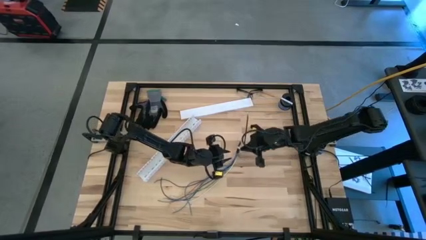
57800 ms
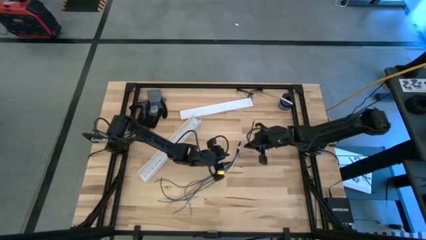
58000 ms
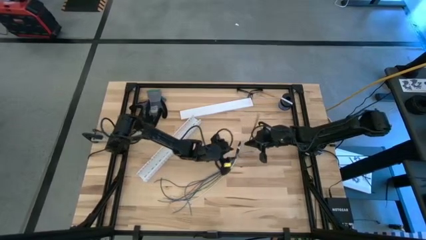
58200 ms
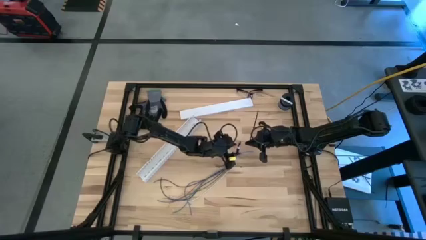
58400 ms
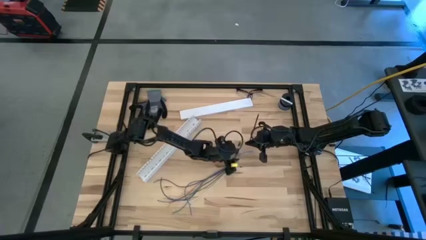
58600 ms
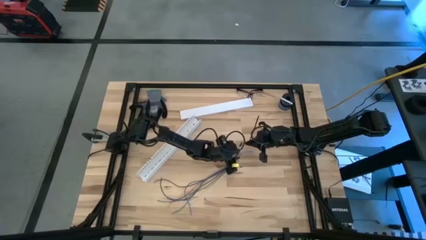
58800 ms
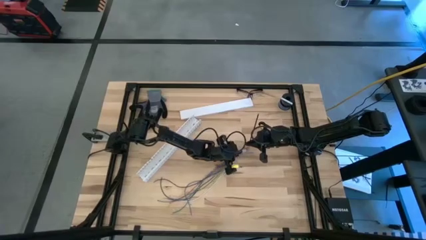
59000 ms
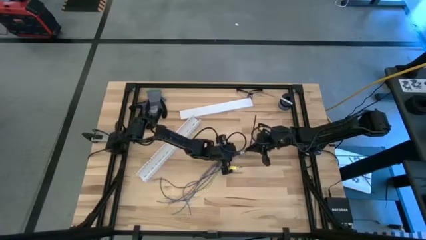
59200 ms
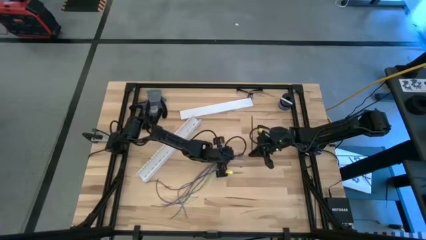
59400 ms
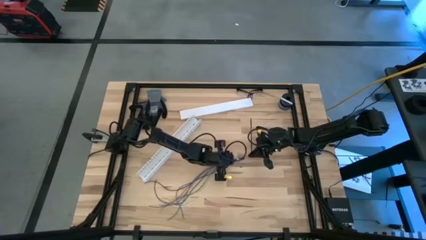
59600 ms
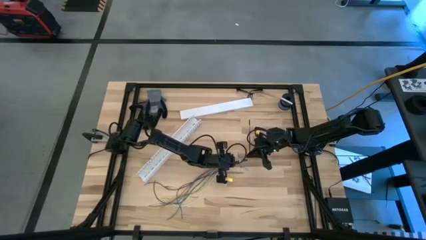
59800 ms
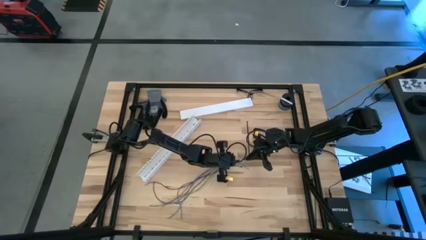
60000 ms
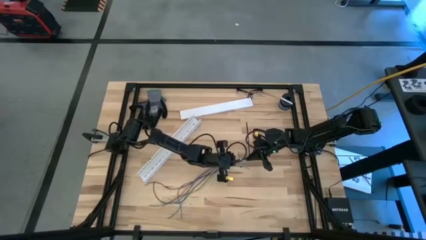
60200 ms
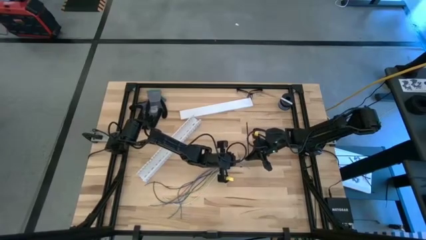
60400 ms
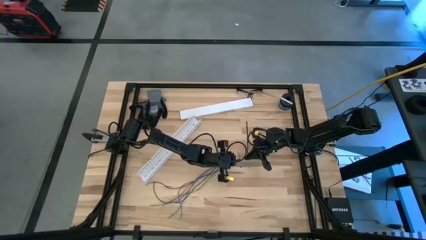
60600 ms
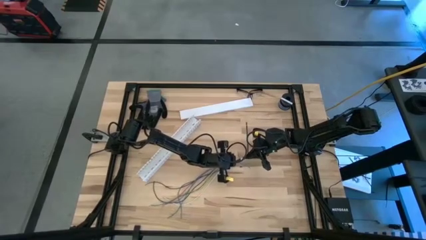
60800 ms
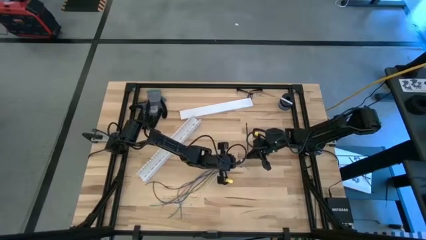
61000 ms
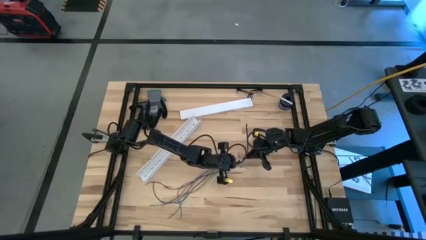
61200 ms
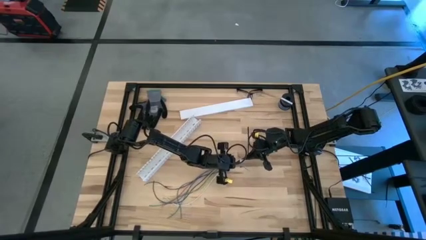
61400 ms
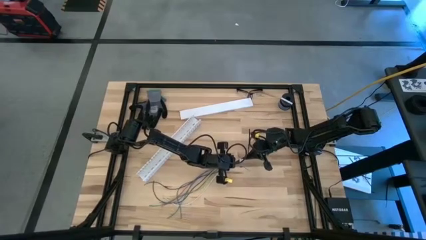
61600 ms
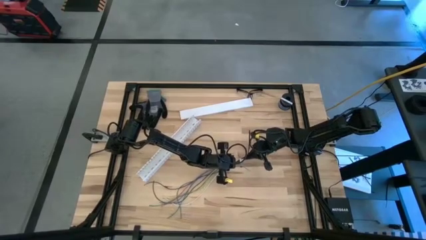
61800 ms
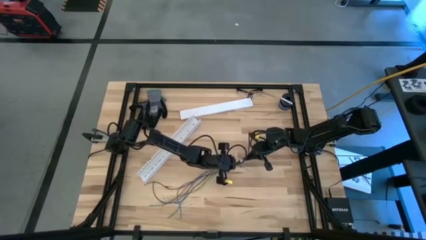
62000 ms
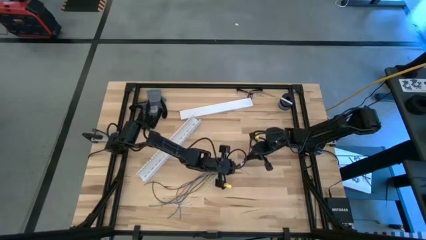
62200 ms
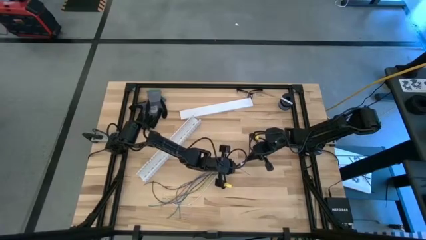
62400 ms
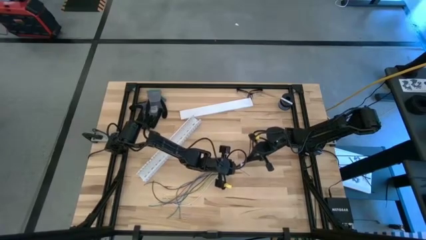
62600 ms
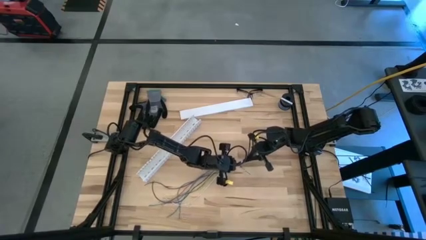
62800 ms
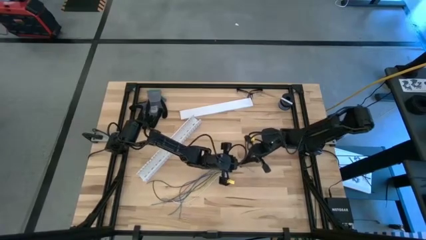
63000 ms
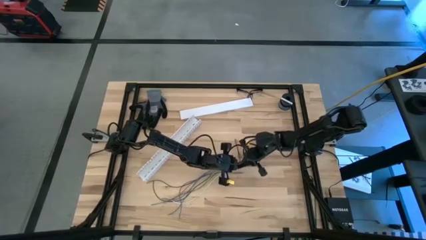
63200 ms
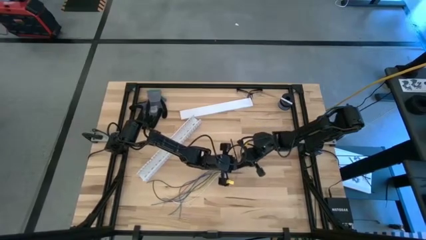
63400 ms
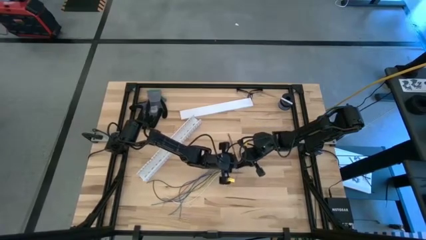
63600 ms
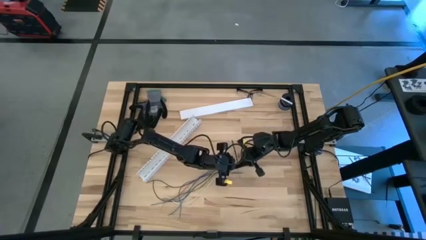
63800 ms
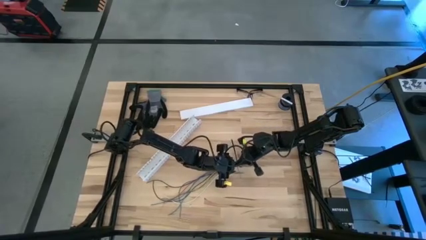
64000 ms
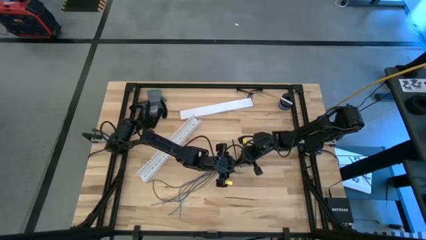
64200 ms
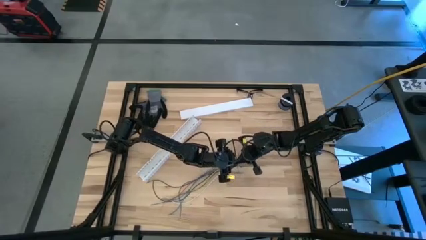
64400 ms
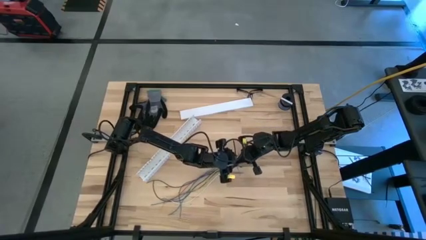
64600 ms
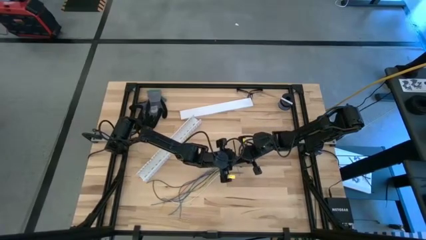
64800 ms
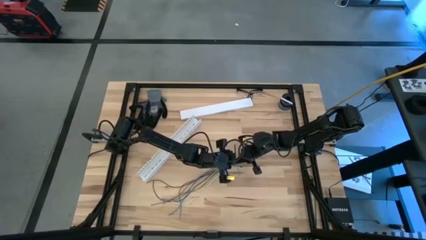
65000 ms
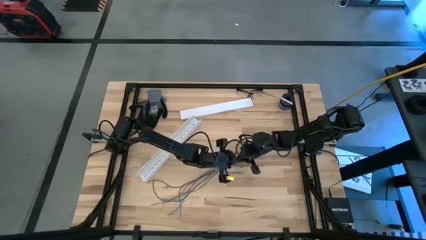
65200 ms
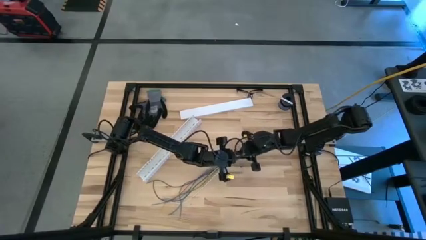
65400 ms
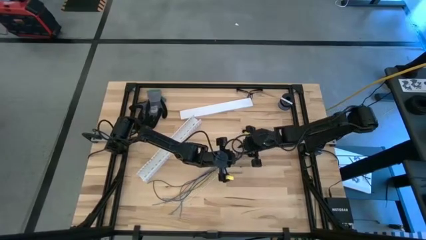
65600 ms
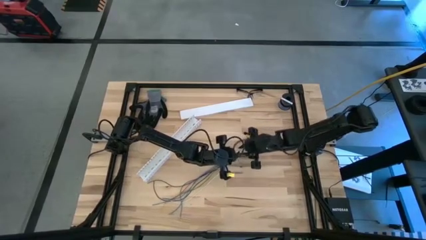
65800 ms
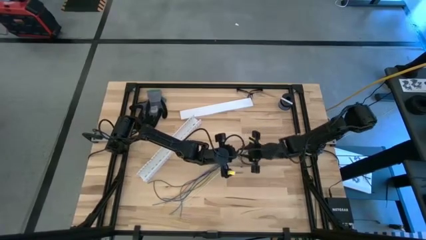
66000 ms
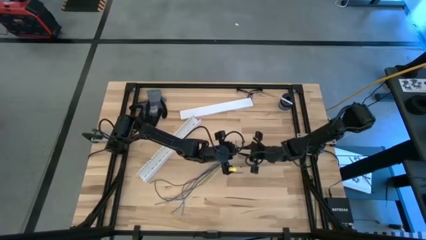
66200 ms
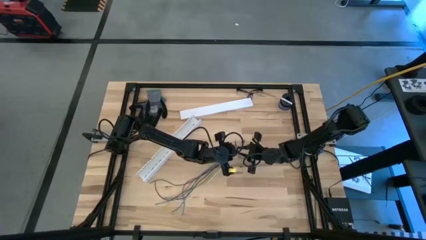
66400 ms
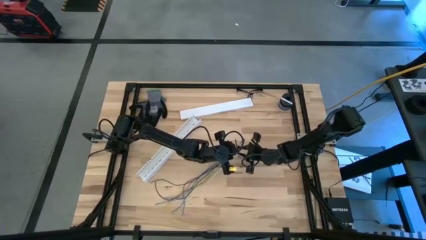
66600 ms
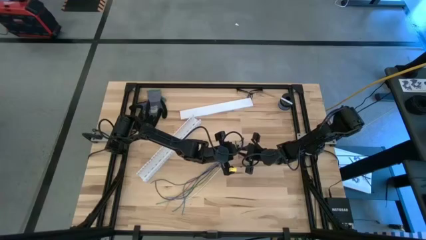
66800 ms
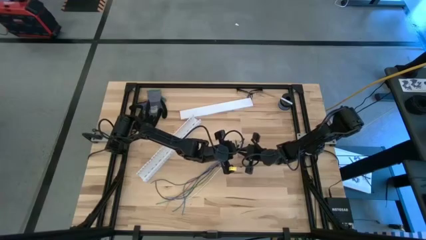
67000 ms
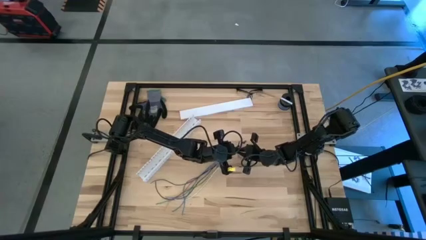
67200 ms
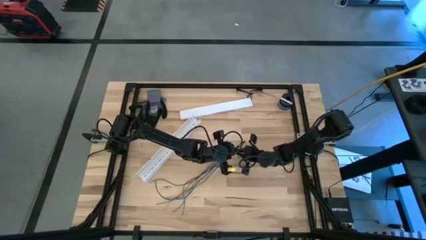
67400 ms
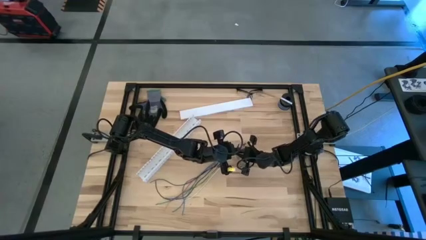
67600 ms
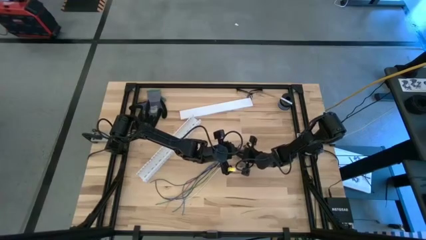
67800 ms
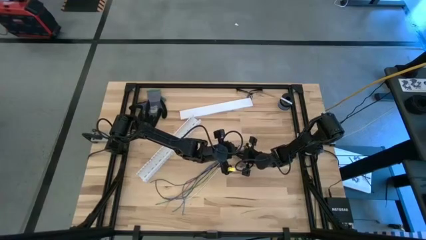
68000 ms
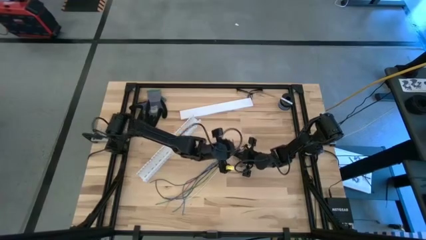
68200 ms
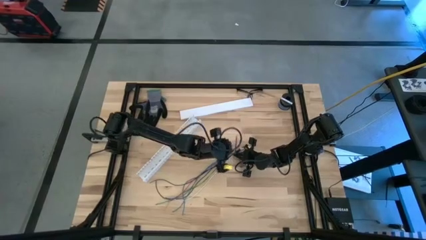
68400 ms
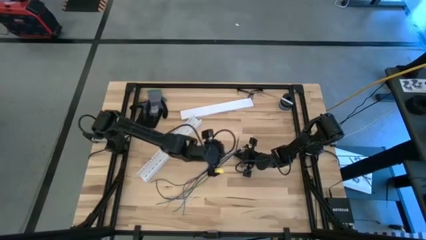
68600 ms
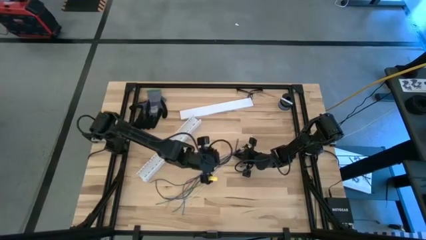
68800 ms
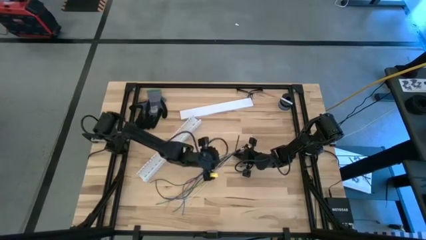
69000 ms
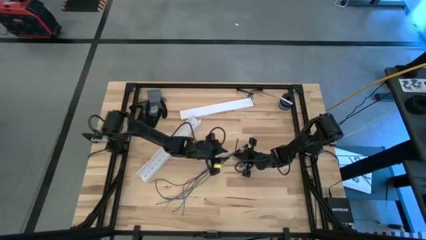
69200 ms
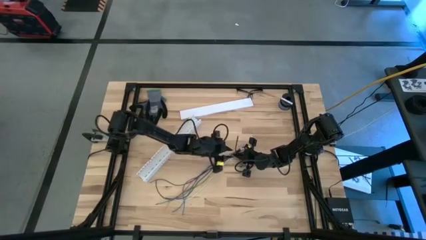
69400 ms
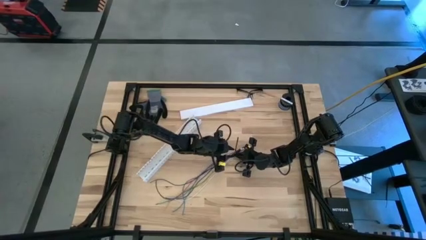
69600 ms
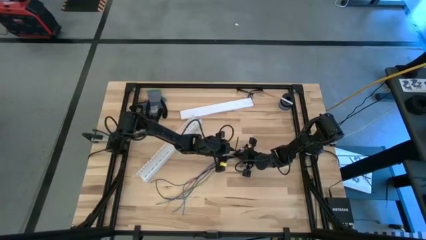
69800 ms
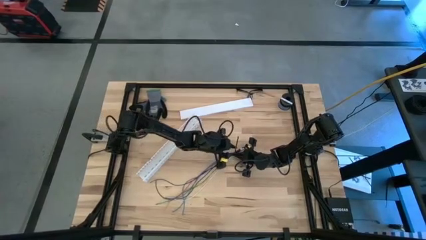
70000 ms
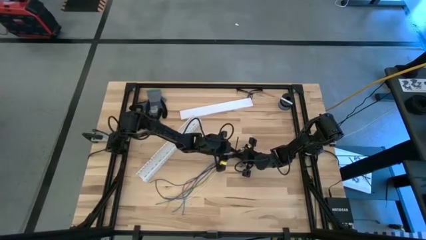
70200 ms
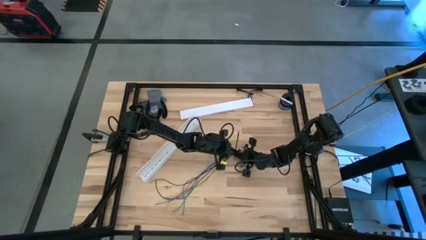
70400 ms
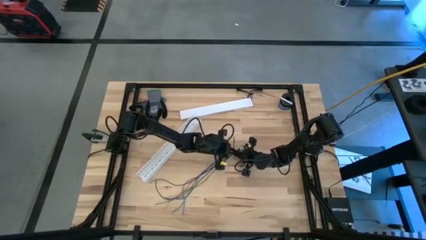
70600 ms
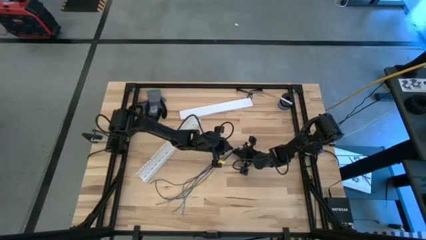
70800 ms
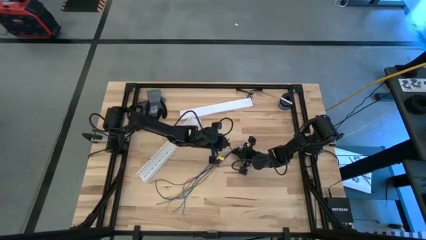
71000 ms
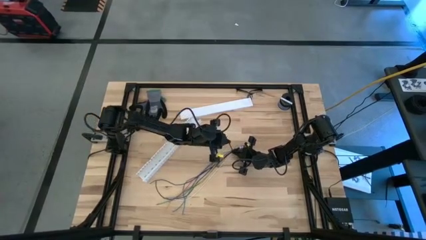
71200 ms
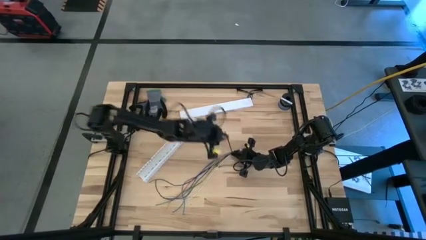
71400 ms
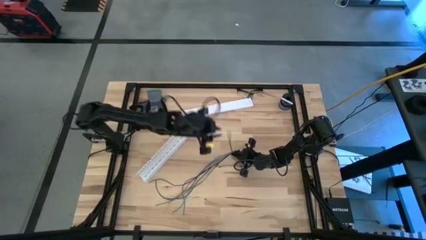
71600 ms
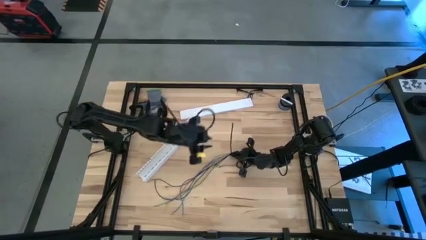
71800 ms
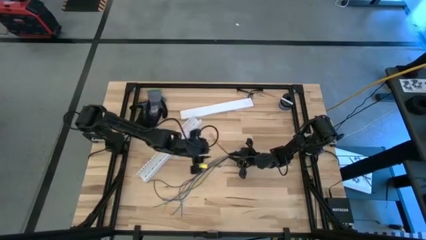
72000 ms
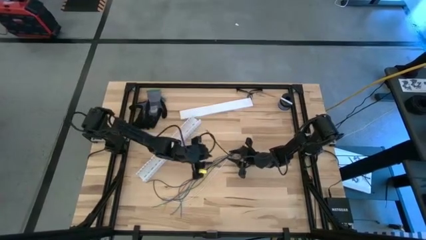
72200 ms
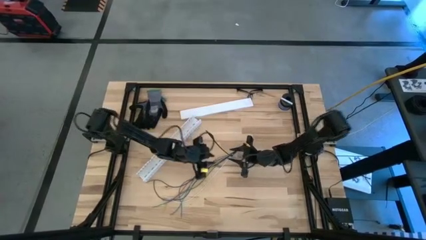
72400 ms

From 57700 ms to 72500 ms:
Task: Ziptie cables
Wrap the zip tie on the cables

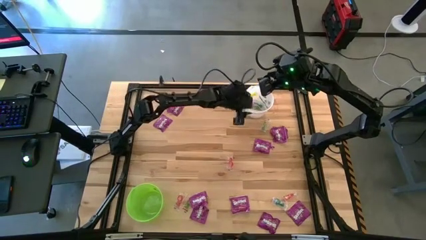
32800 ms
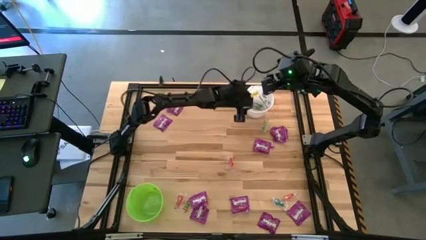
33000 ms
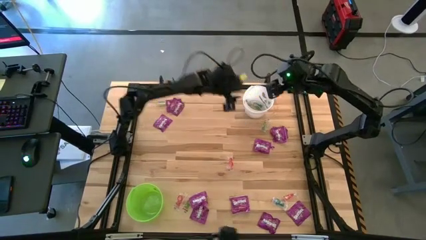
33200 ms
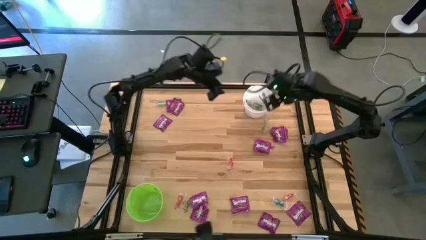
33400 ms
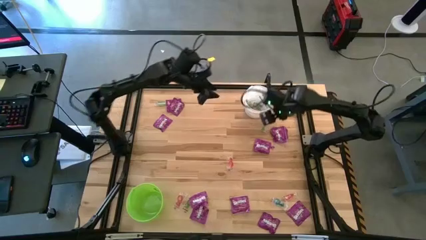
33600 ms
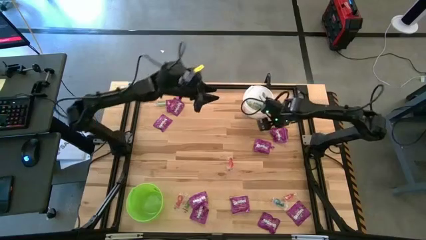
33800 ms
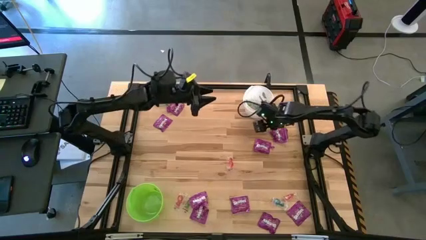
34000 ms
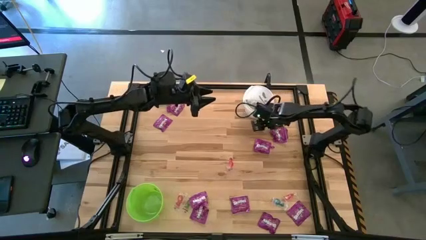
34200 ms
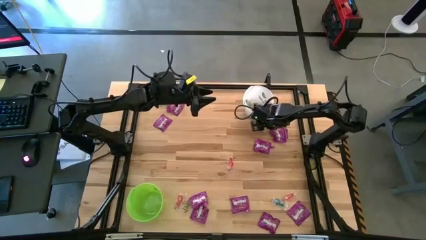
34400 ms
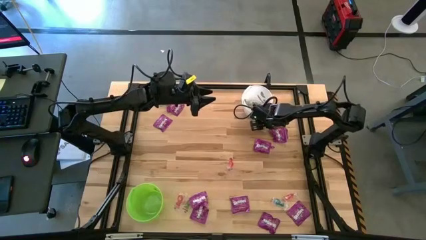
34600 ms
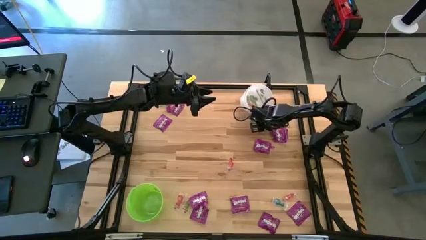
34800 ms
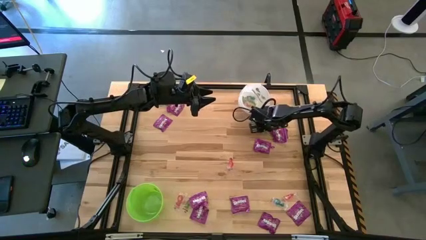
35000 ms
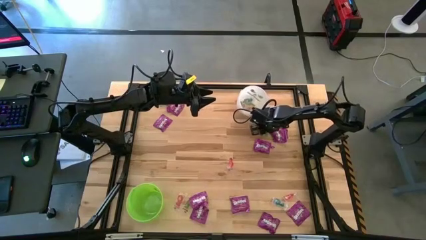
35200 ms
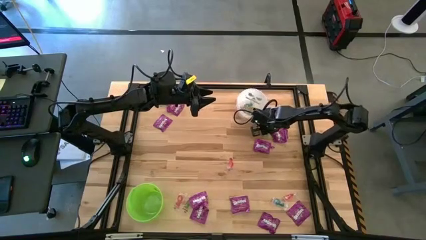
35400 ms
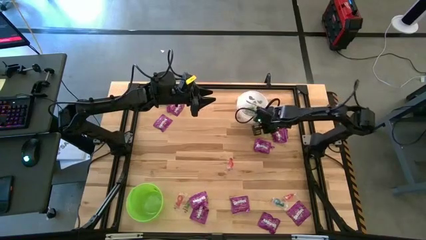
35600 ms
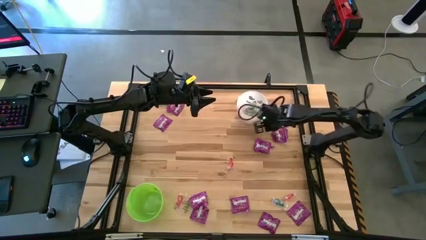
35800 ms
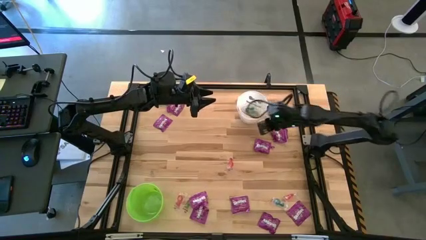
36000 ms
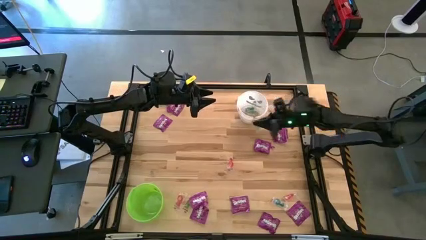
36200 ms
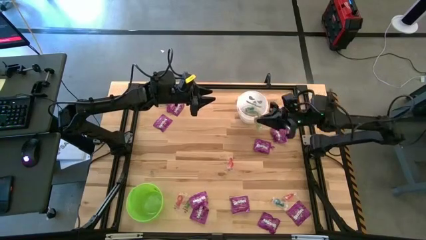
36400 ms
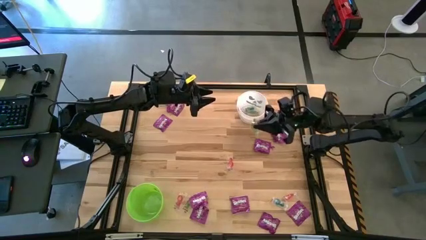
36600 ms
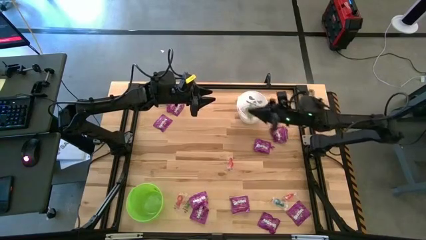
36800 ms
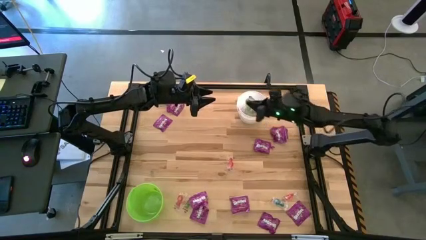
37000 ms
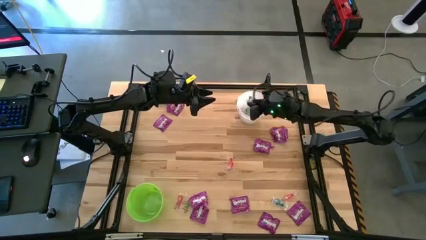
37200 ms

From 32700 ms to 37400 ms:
Task: Sort candy by brand, put in halloween buckets
Put the green gummy into the white bucket
